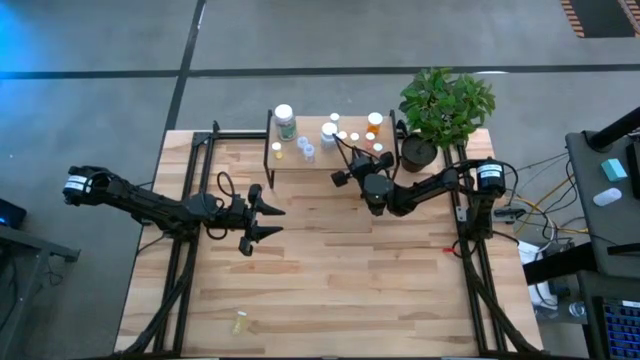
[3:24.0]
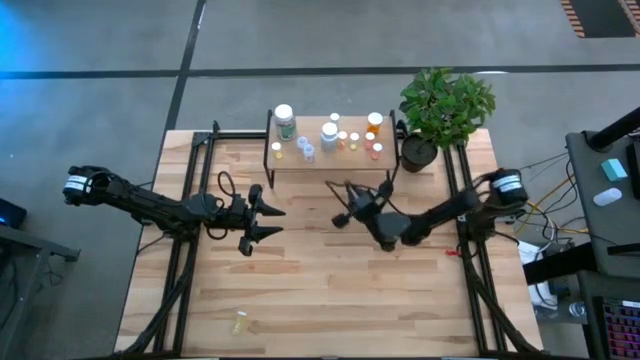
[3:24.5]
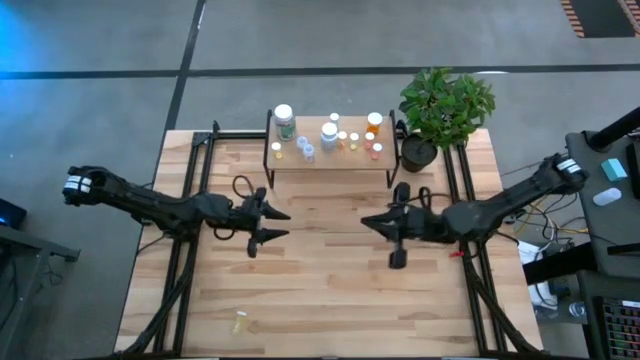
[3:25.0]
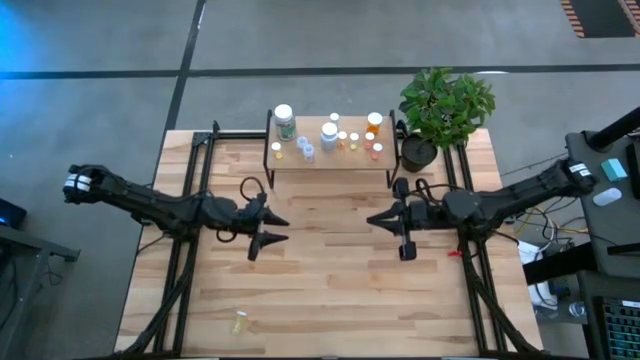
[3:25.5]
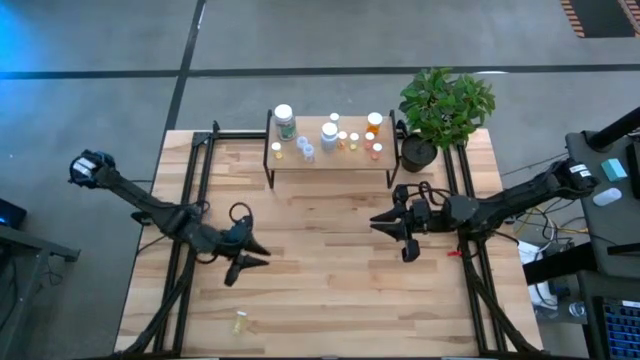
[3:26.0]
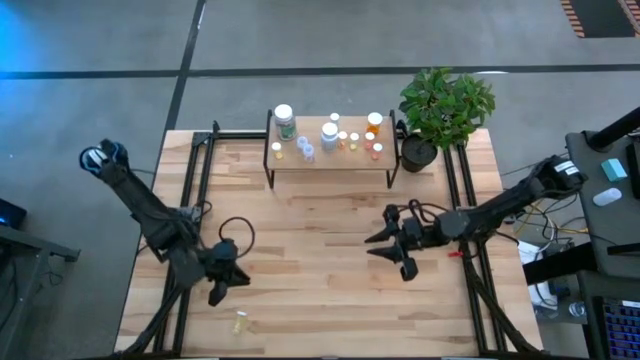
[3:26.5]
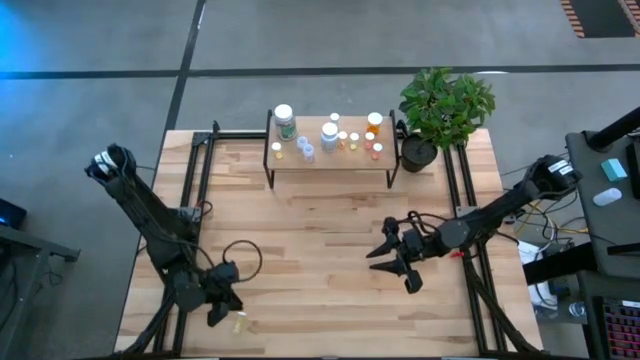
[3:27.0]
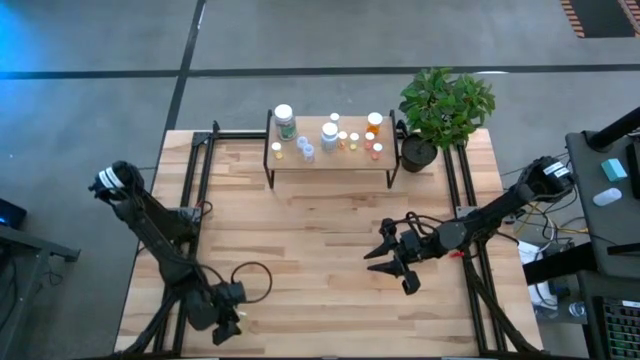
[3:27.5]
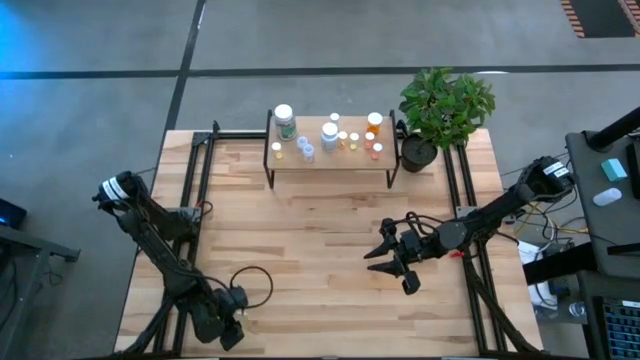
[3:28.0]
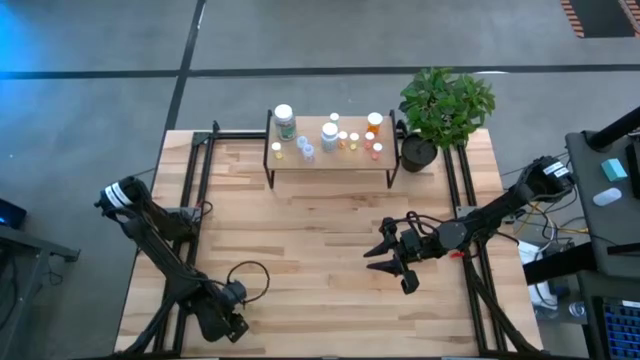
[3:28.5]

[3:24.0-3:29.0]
Task: Pick and place medicine bottles onto shelf by color
Put the yellow pill bottle on the shelf

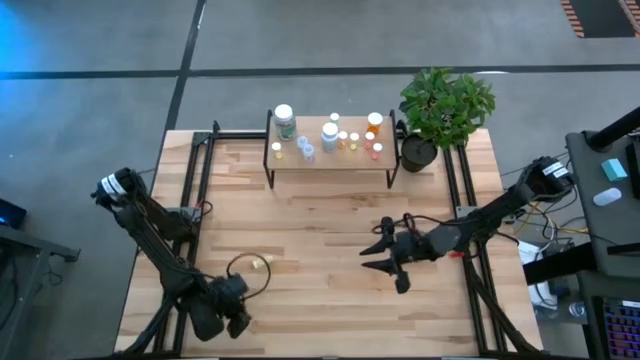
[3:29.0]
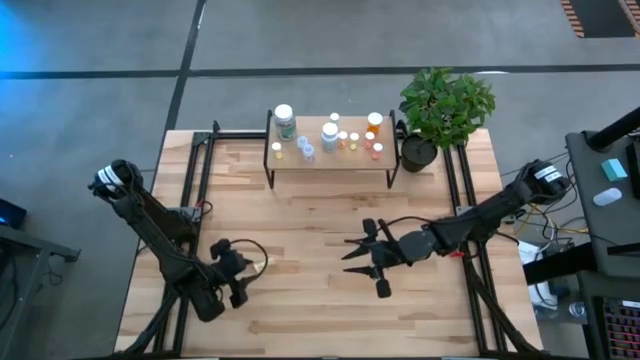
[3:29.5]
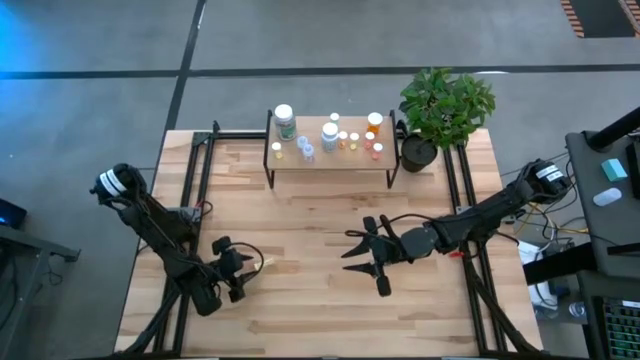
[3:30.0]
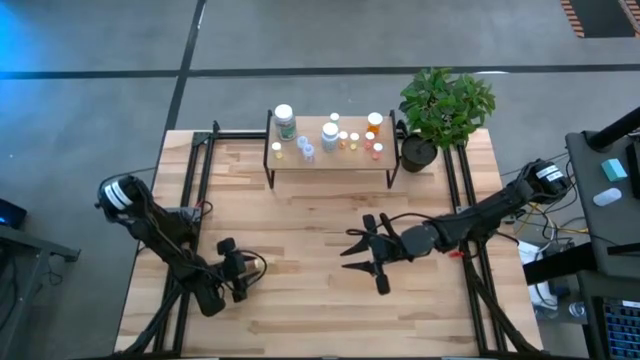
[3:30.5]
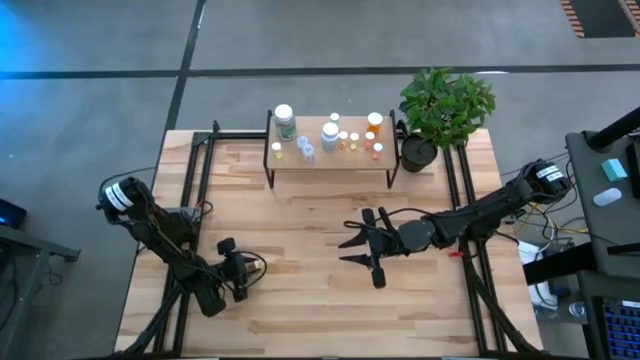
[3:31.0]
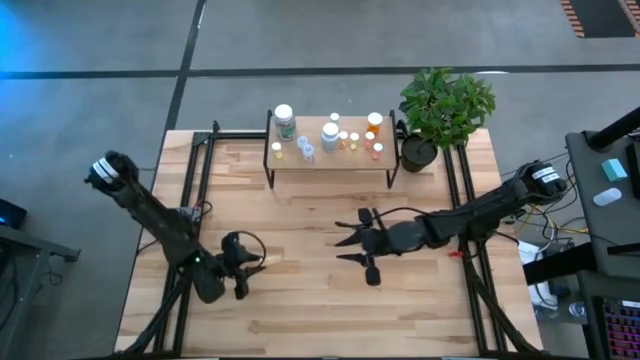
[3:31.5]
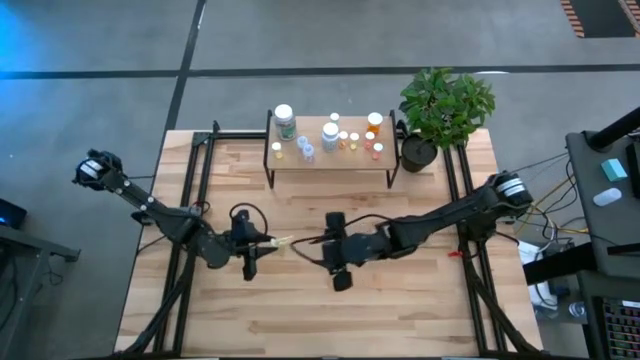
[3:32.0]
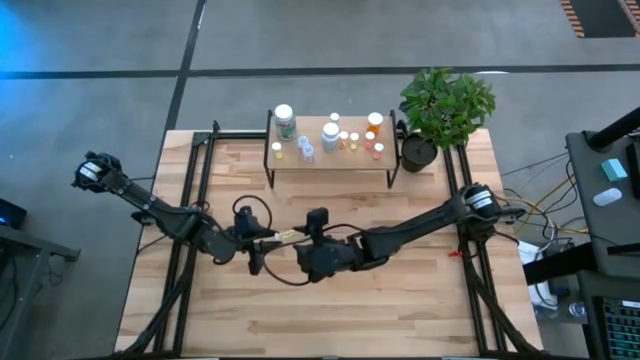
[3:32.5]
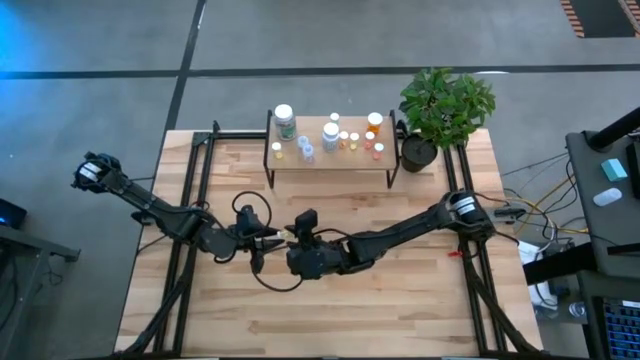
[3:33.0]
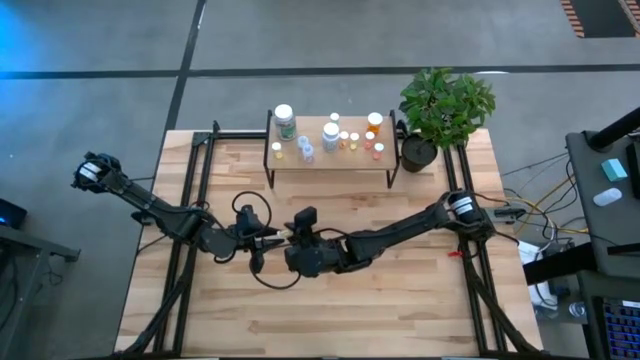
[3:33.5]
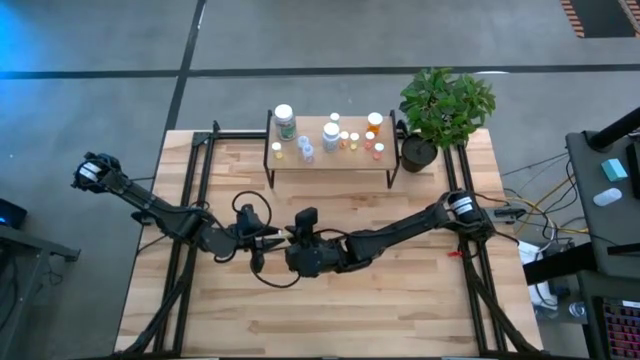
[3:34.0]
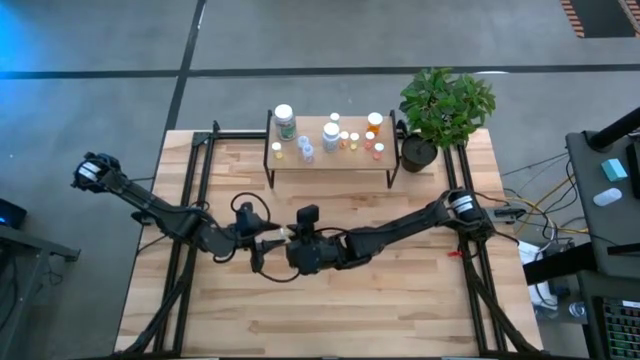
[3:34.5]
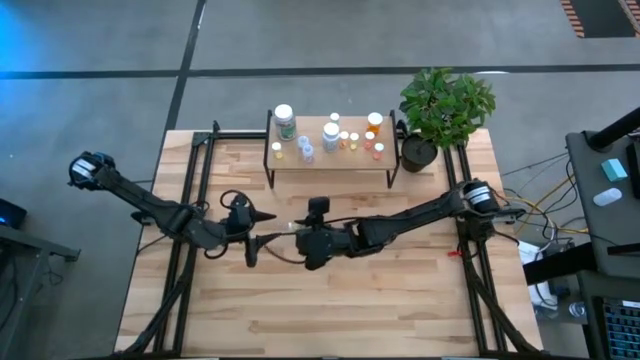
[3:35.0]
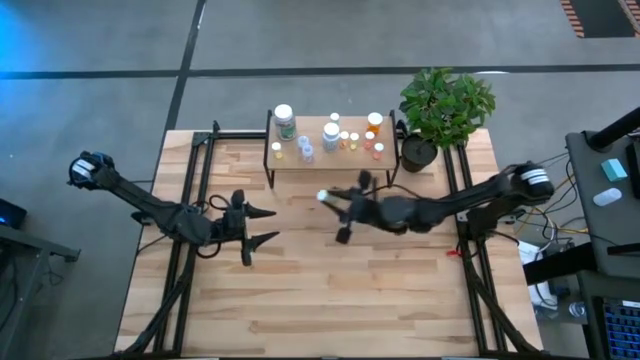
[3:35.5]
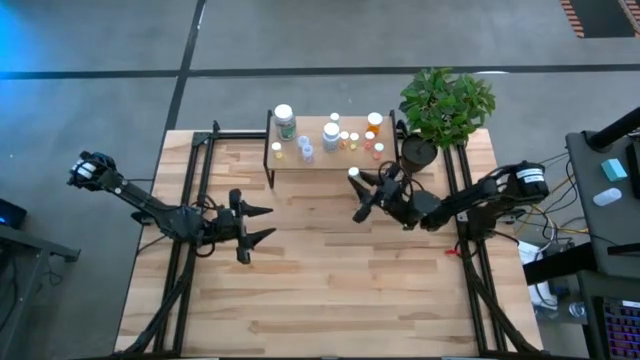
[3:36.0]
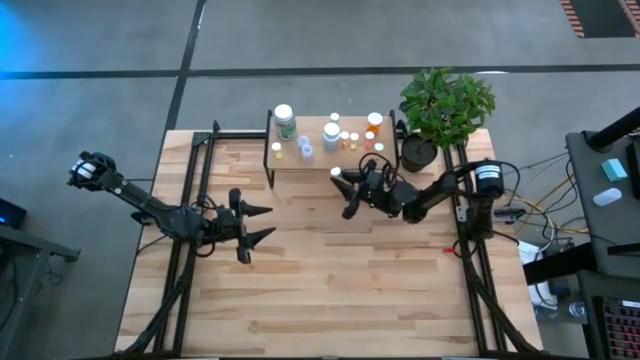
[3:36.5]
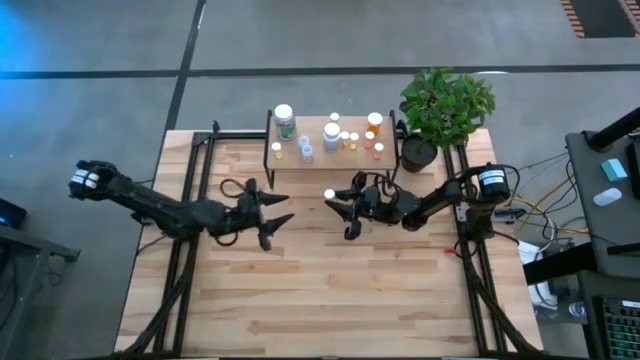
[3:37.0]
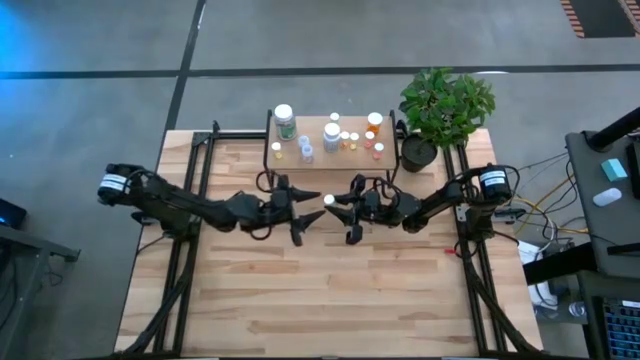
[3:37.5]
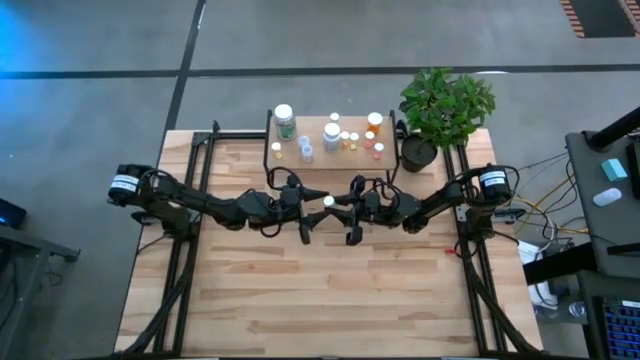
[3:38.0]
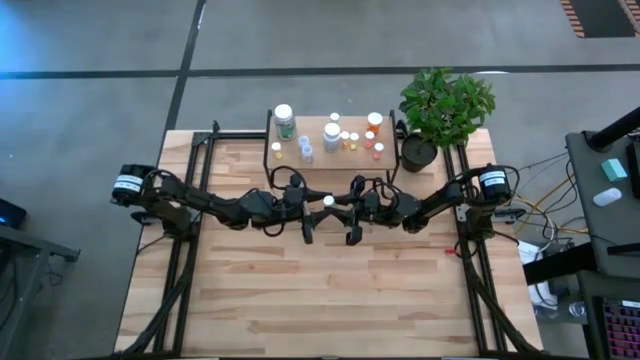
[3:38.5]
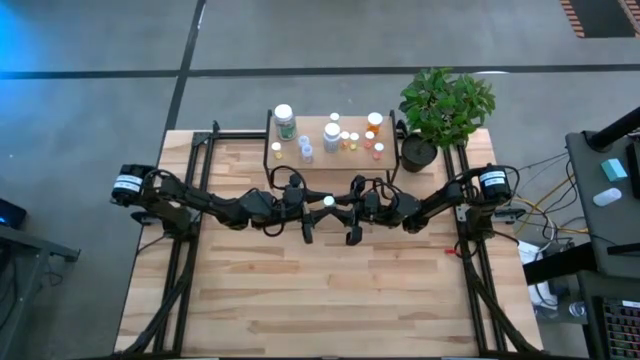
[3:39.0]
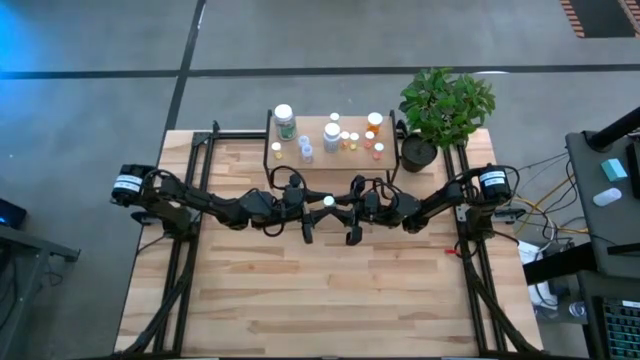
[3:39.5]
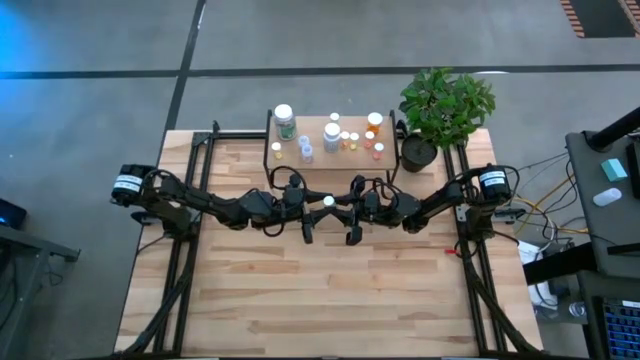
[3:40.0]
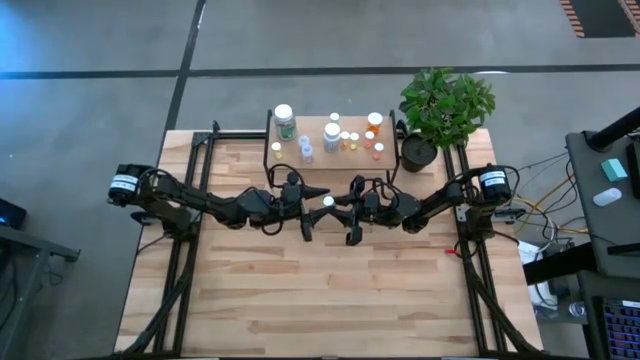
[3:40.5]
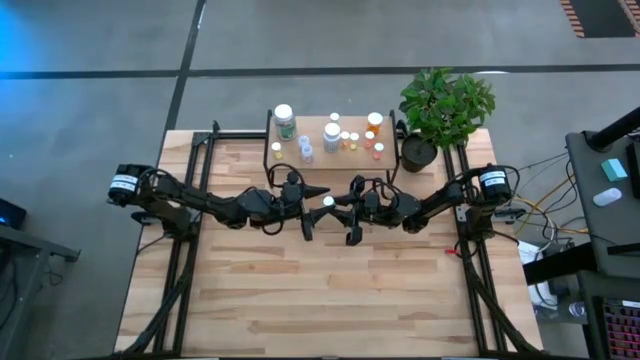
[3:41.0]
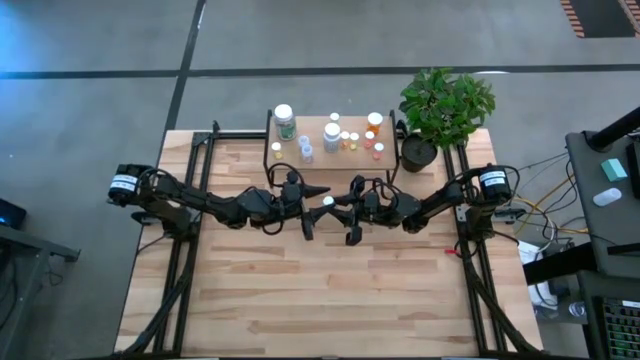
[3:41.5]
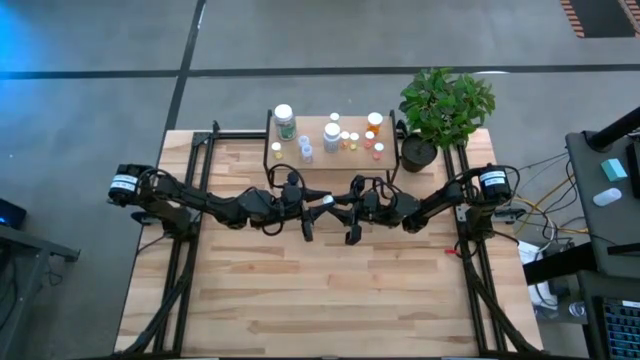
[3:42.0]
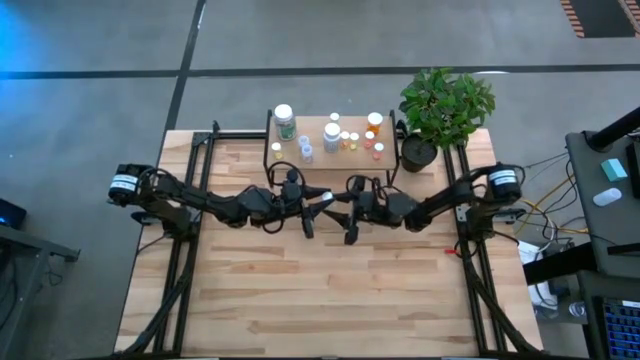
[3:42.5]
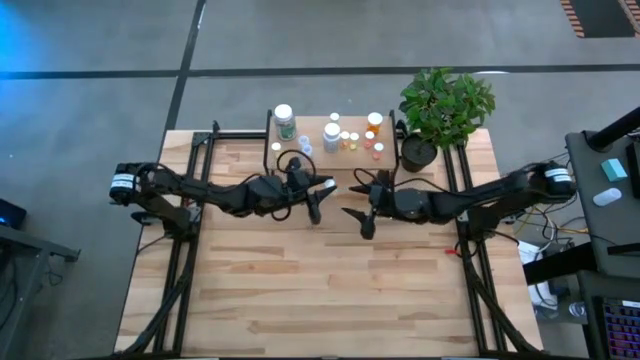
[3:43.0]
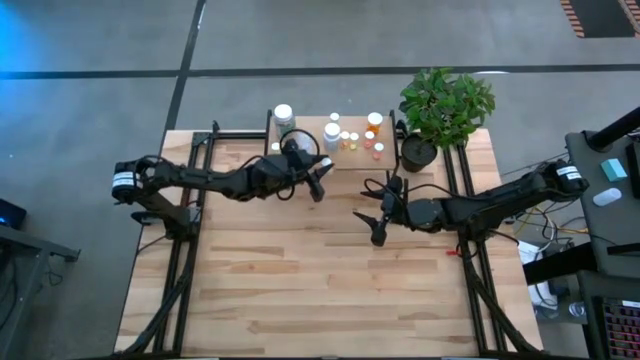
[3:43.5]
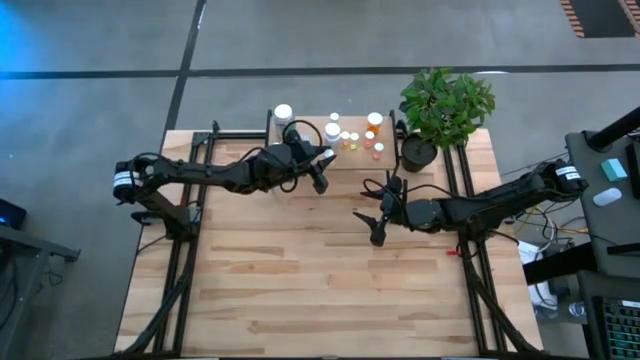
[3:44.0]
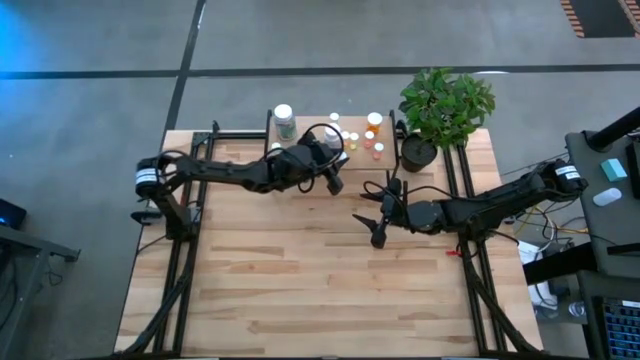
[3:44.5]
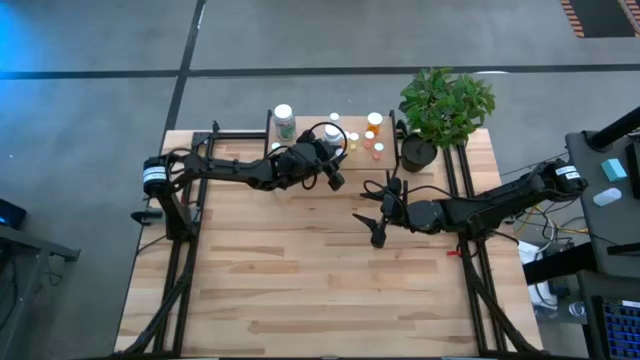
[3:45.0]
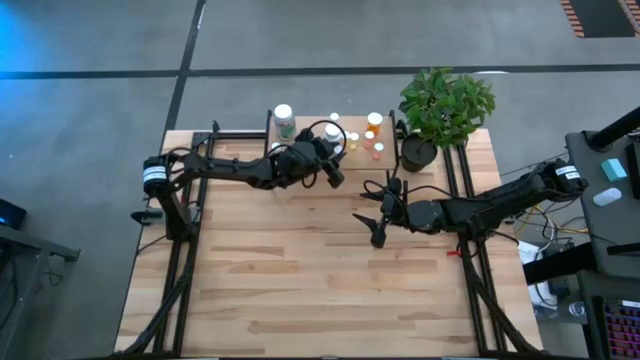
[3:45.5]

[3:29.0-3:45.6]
Put the yellow pill bottle on the shelf
